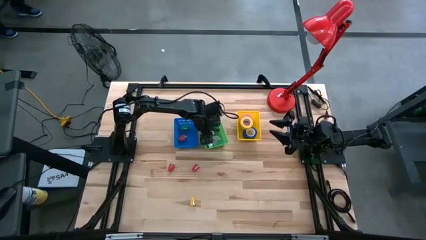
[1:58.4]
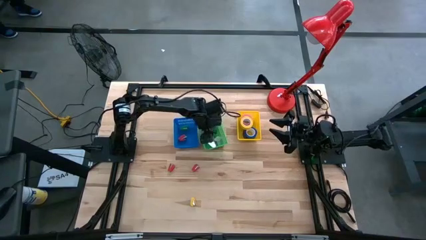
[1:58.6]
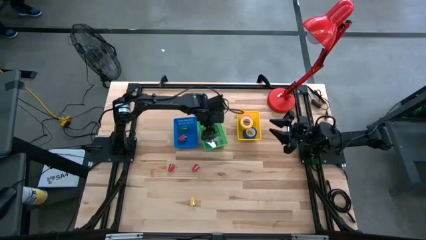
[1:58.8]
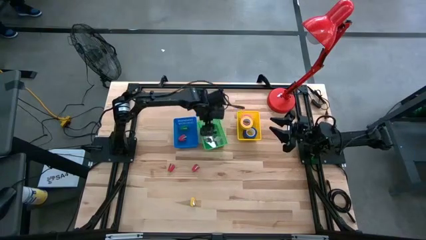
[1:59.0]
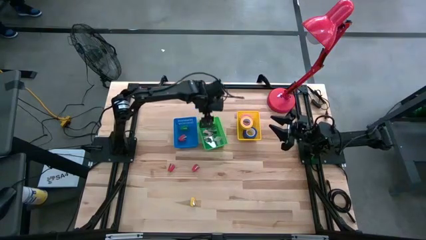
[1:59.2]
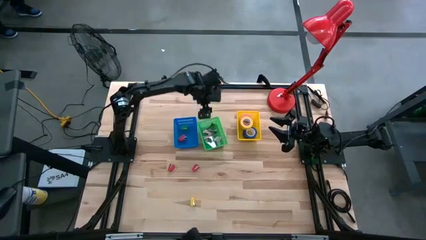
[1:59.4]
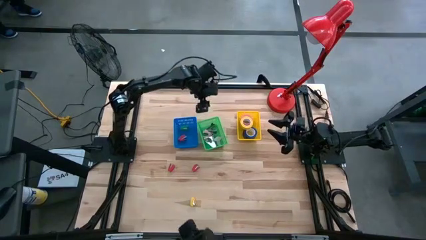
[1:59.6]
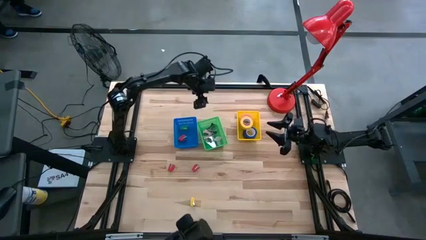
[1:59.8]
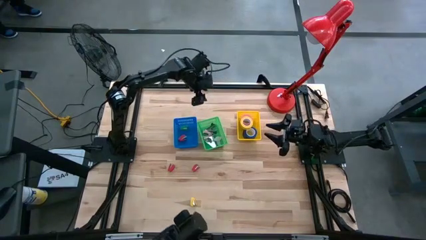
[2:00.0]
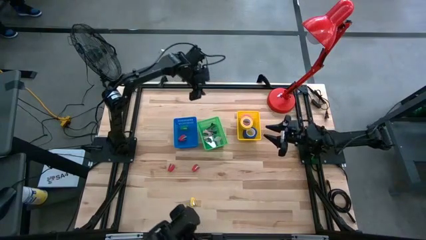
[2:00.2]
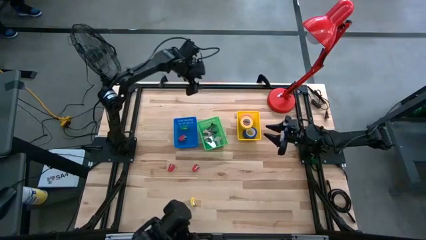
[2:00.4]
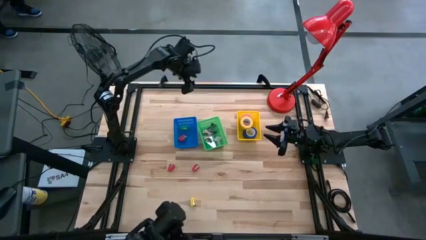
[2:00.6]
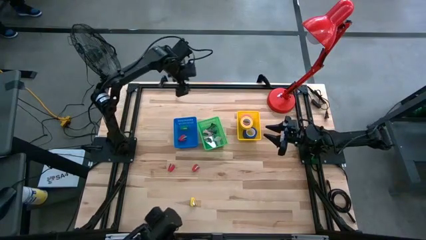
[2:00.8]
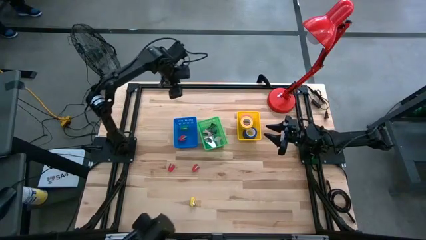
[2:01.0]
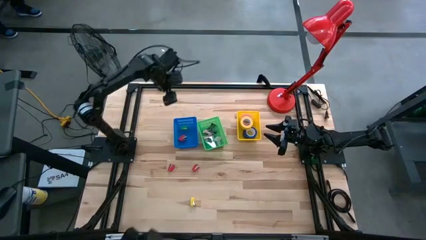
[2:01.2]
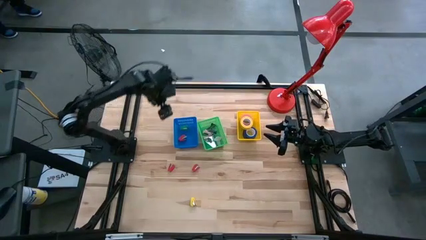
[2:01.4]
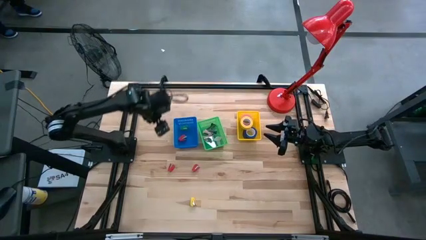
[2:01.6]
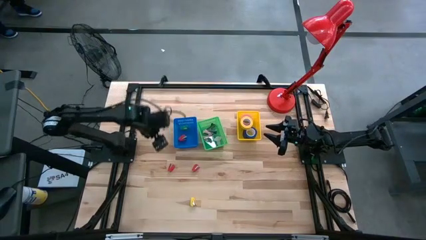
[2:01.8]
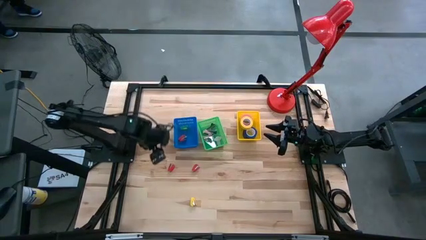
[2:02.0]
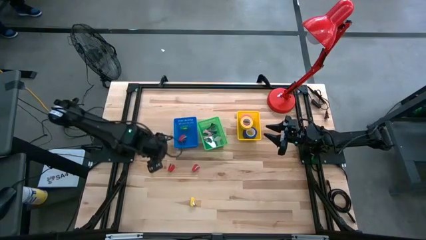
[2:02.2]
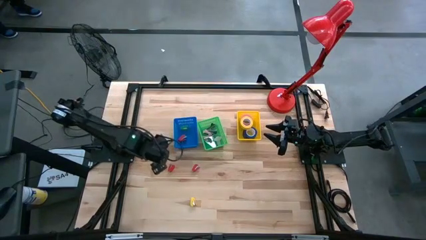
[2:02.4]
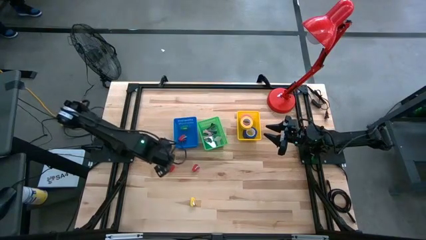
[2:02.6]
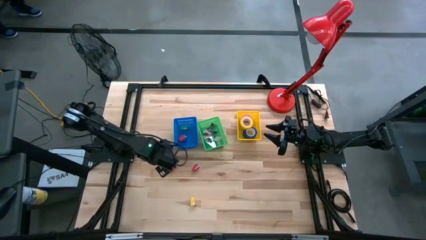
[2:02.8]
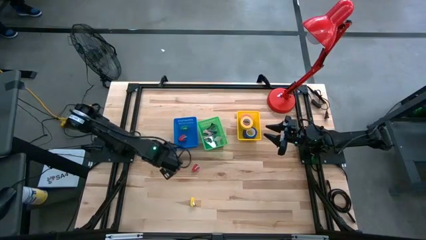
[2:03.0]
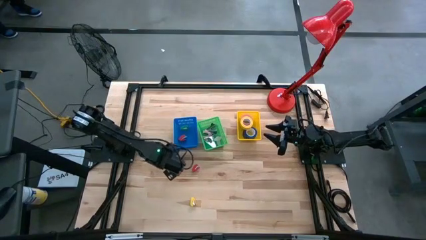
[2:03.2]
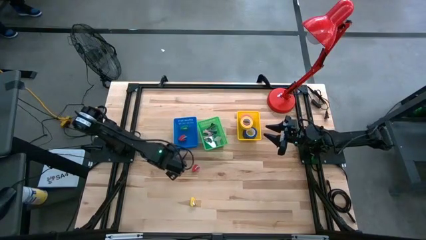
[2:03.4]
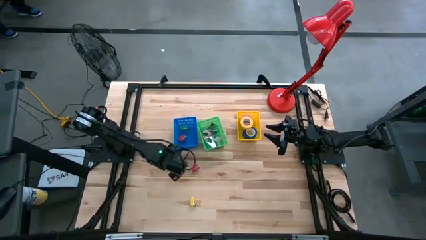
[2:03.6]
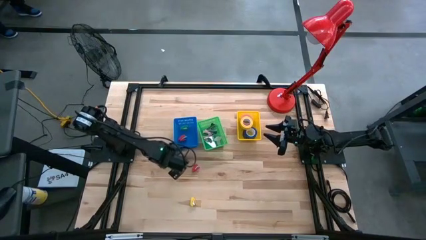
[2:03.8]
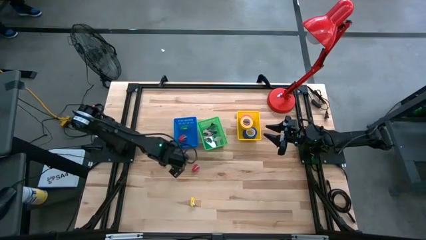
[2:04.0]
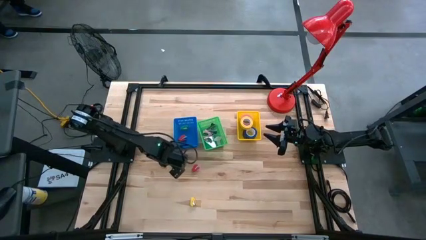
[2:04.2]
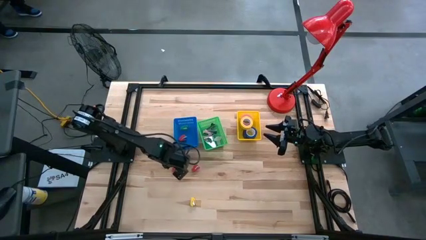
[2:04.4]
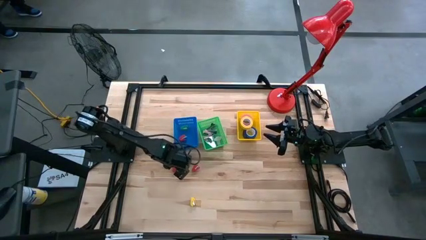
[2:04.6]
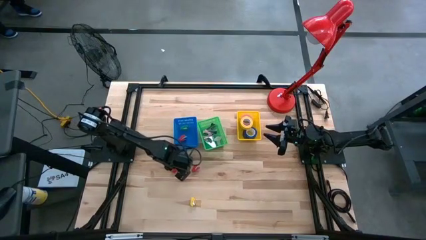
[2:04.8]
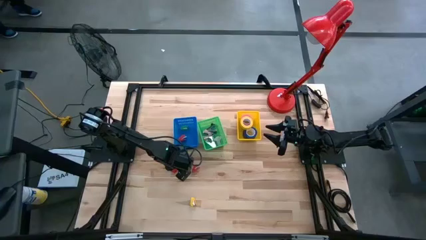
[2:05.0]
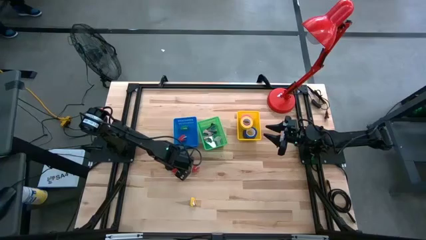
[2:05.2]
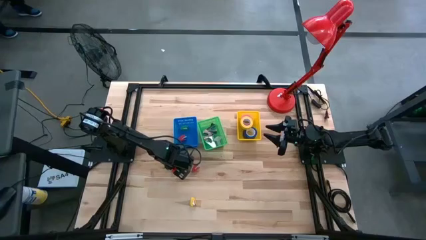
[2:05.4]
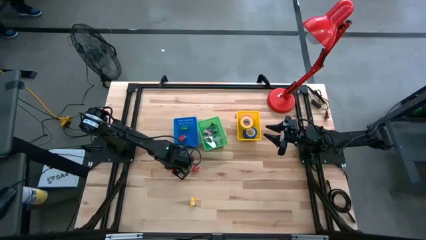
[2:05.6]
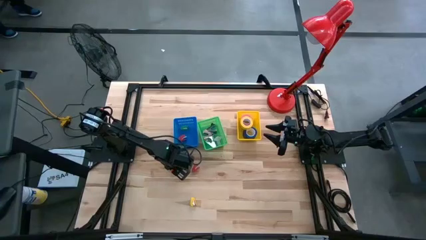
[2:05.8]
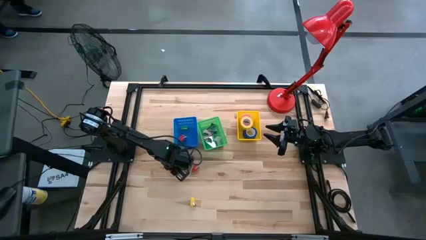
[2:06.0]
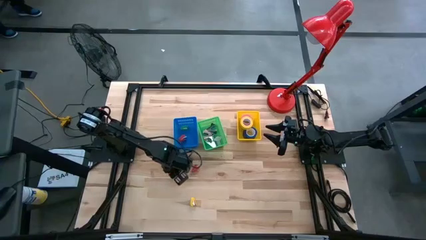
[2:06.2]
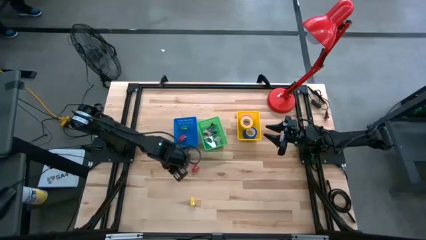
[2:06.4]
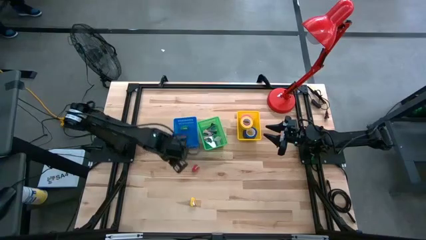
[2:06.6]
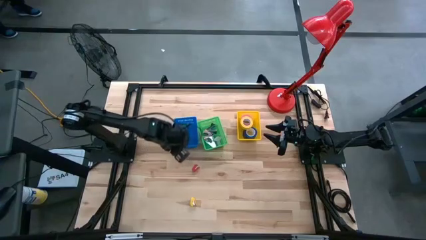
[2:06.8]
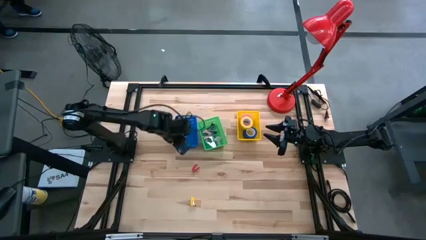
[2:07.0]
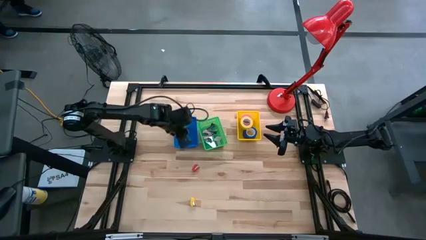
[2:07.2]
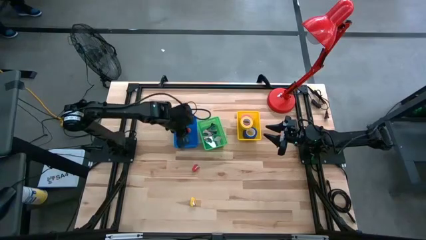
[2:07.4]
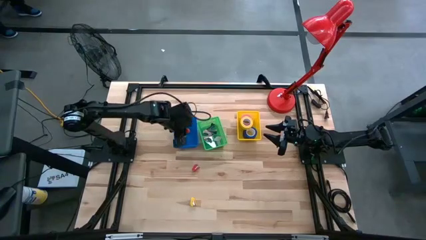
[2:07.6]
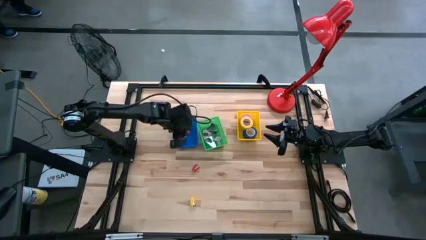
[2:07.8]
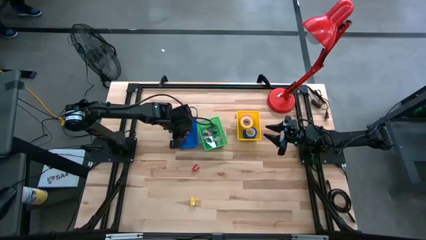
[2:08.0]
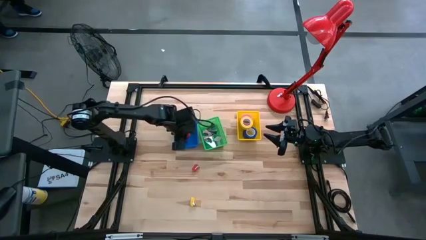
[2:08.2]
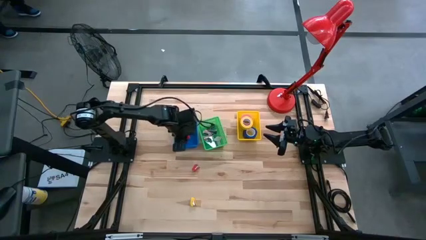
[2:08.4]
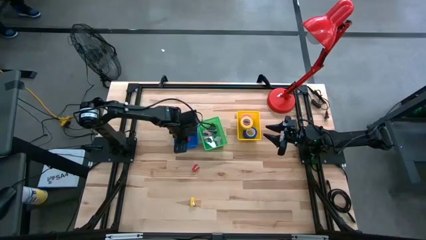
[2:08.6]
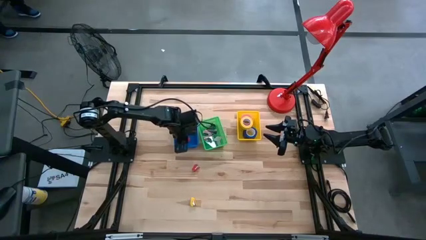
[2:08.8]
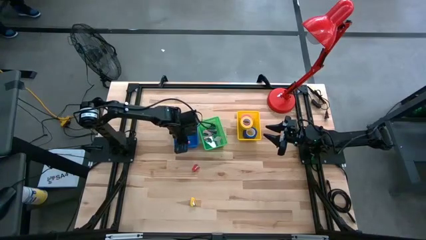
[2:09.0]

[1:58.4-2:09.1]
Task: Pick and place Stapler, Stapler remover, tape
Put the left red stapler into the blue bin

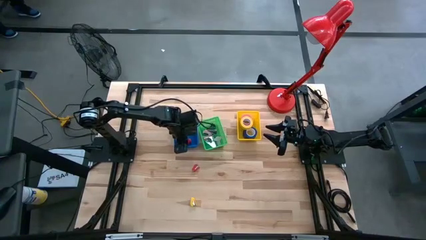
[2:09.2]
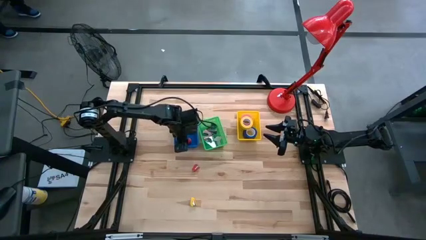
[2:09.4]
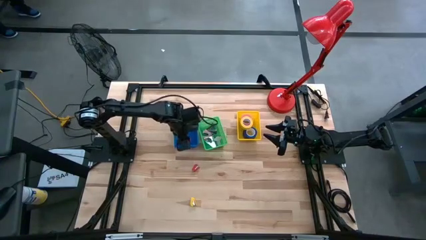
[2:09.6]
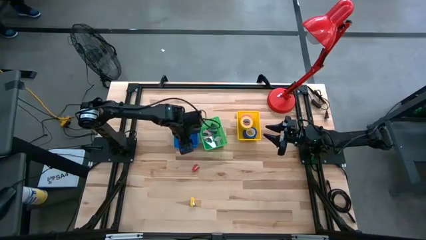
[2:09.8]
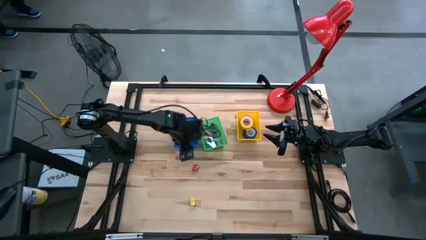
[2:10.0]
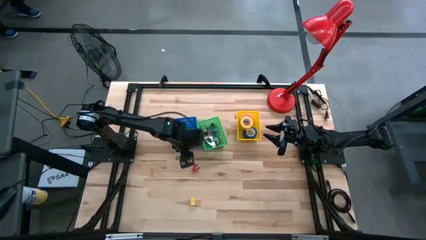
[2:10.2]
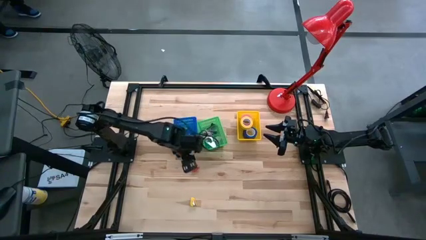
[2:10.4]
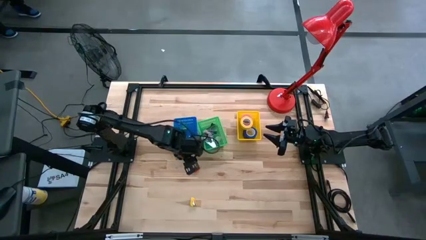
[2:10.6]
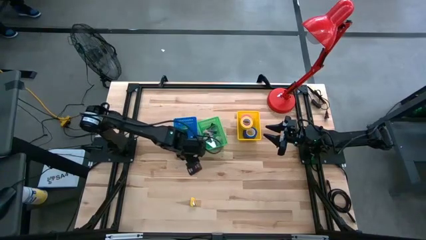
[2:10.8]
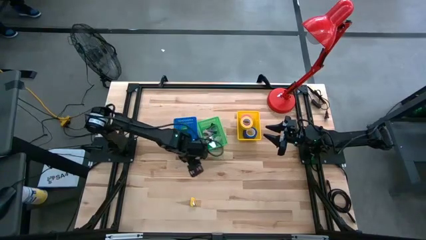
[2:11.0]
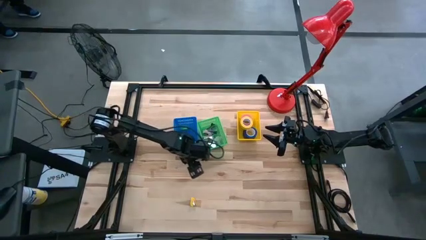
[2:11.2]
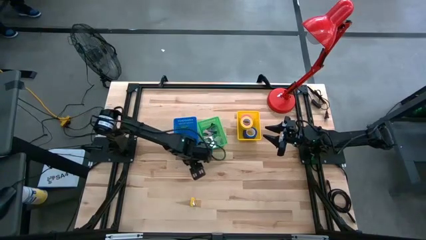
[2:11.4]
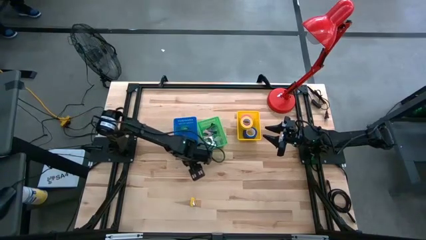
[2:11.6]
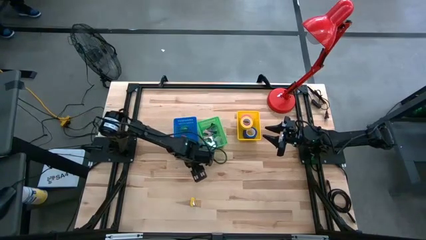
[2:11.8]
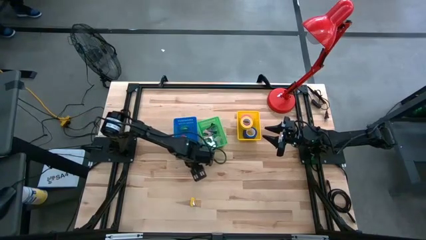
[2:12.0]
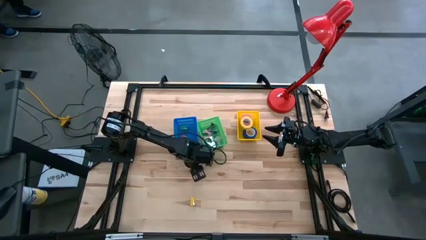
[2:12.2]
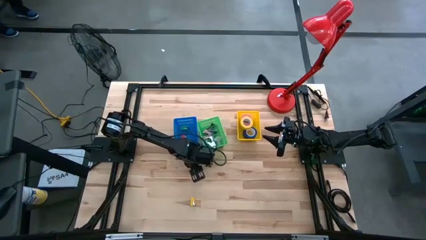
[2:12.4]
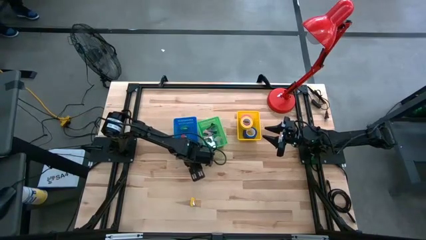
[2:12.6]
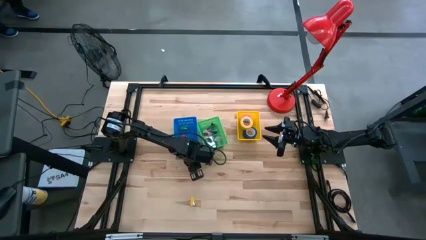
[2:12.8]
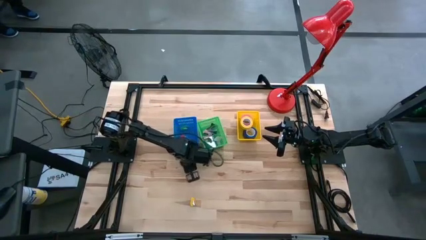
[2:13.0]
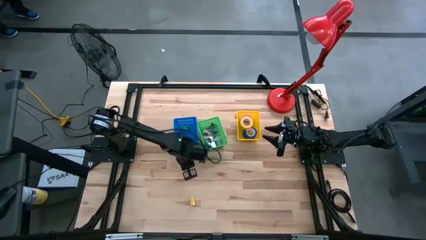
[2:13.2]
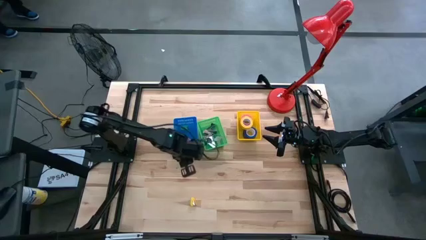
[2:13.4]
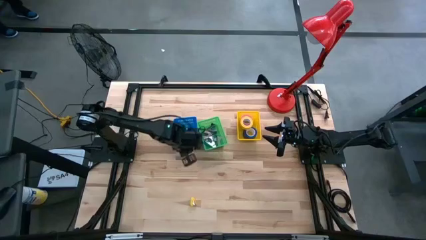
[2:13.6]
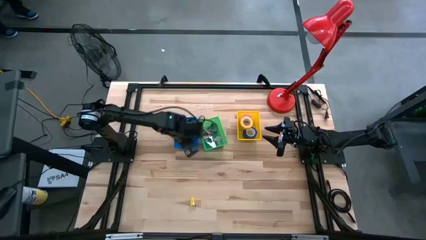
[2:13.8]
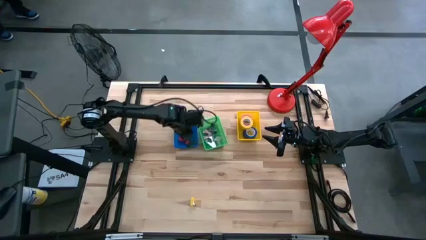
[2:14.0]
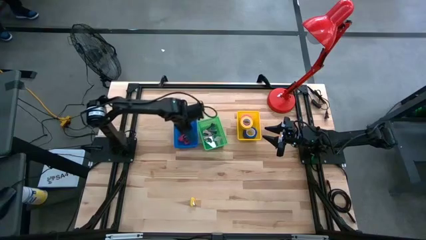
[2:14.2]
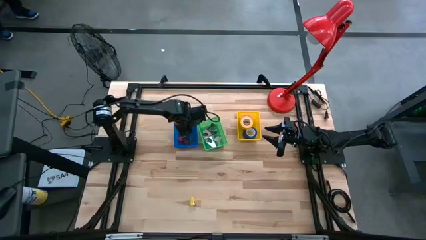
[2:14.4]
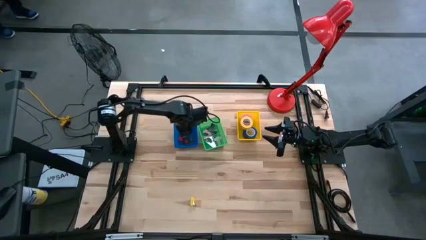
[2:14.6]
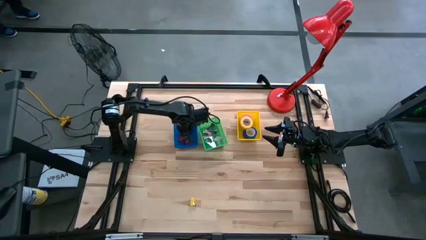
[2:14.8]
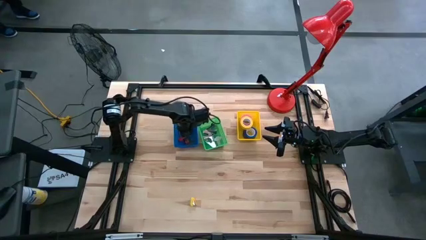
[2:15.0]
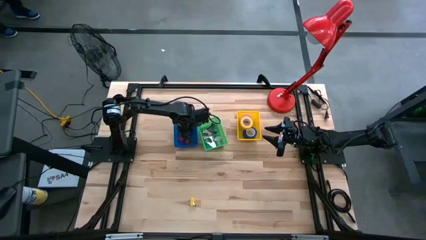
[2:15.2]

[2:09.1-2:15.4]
Put the red stapler into the blue bin
